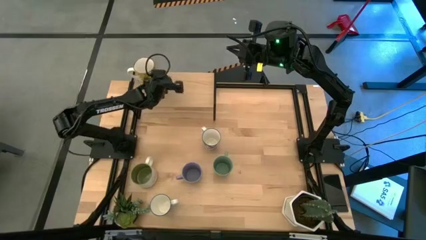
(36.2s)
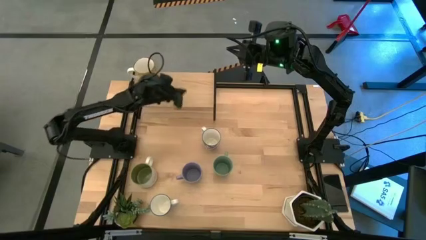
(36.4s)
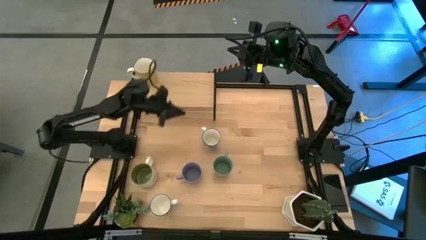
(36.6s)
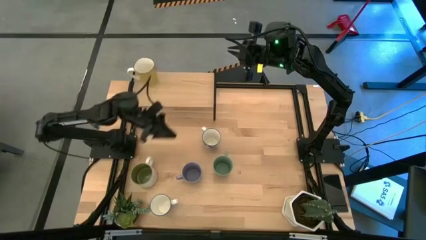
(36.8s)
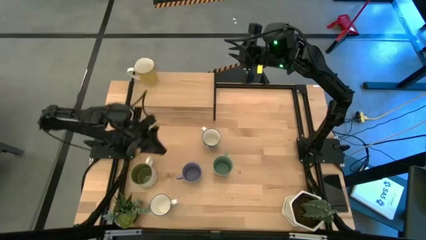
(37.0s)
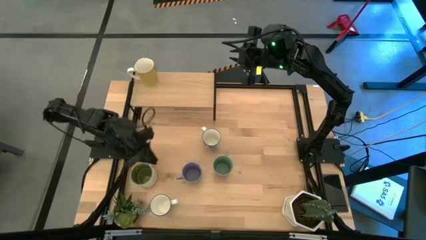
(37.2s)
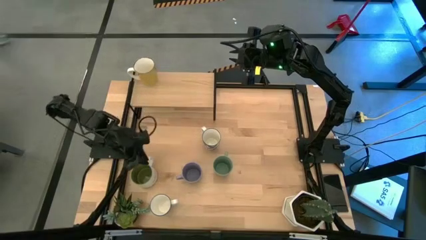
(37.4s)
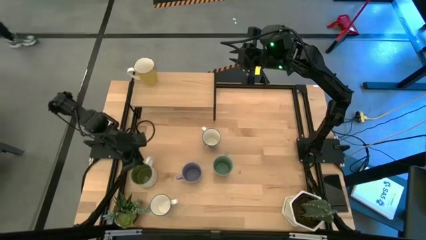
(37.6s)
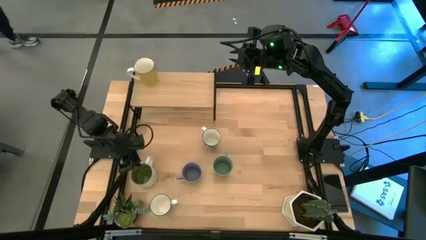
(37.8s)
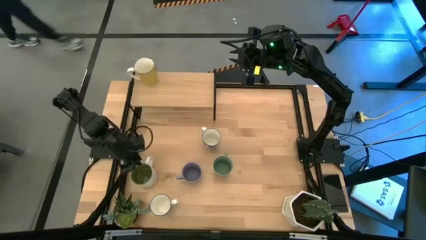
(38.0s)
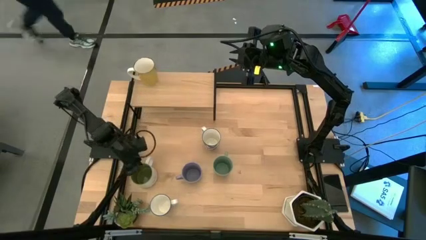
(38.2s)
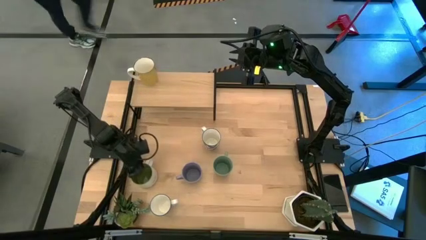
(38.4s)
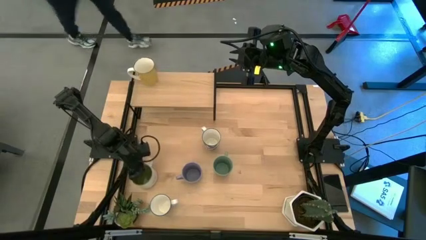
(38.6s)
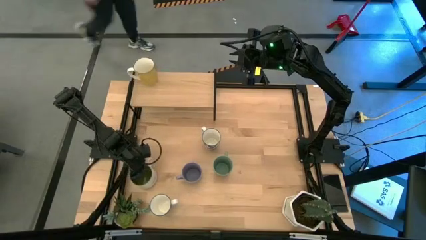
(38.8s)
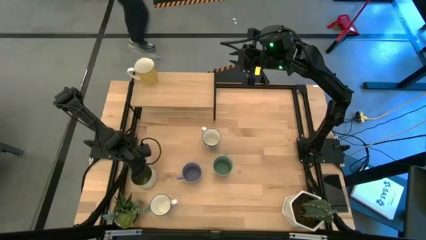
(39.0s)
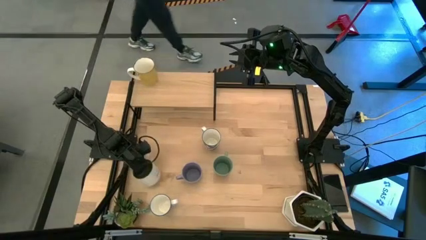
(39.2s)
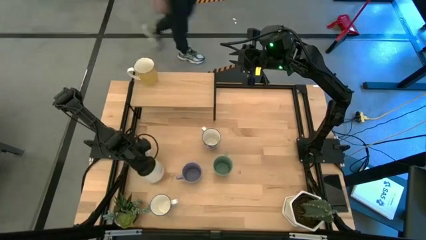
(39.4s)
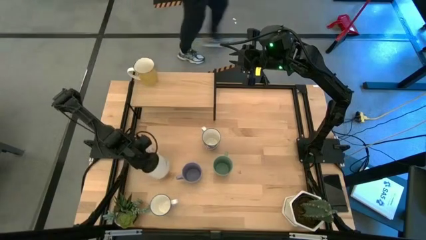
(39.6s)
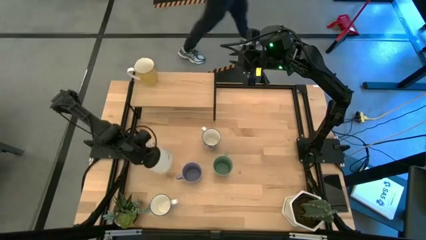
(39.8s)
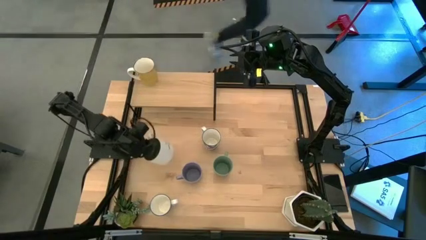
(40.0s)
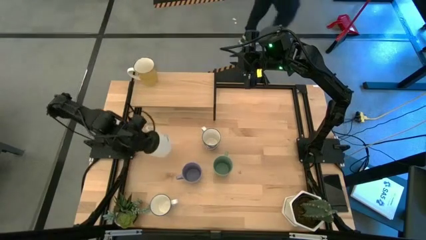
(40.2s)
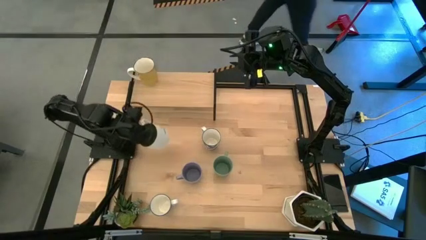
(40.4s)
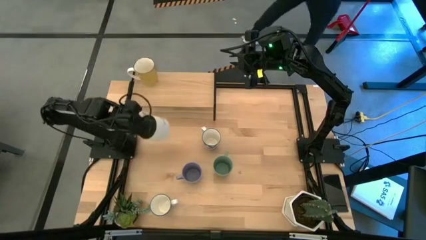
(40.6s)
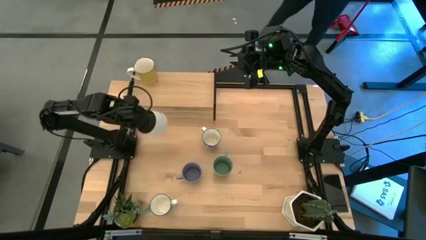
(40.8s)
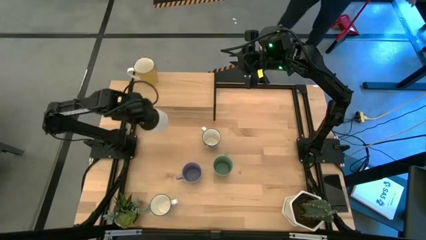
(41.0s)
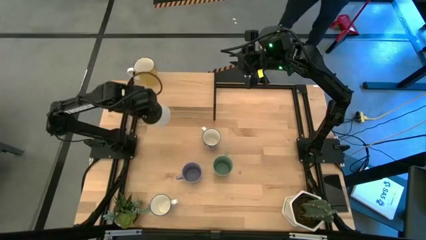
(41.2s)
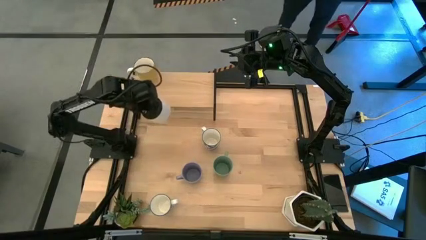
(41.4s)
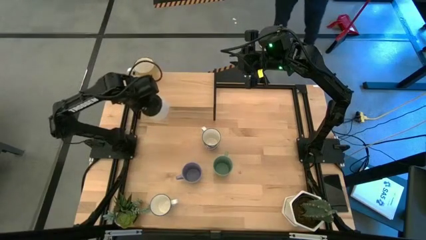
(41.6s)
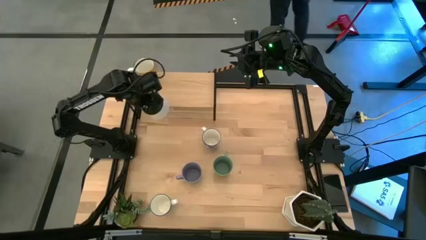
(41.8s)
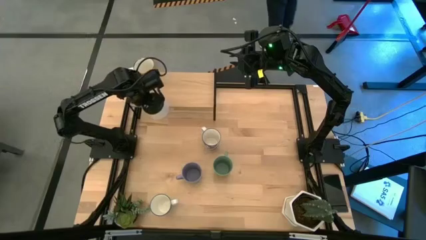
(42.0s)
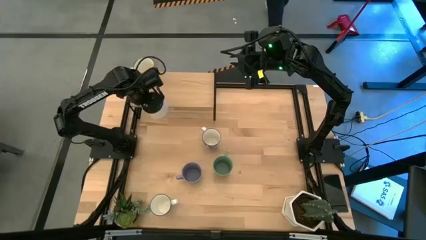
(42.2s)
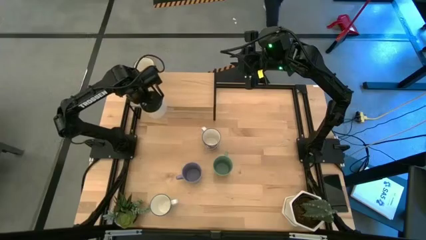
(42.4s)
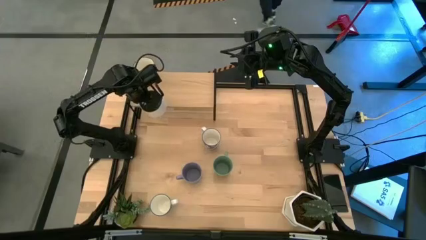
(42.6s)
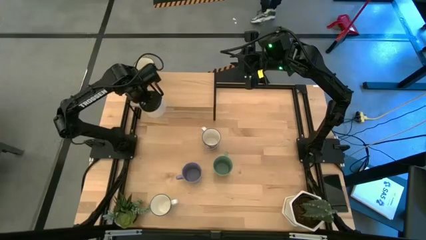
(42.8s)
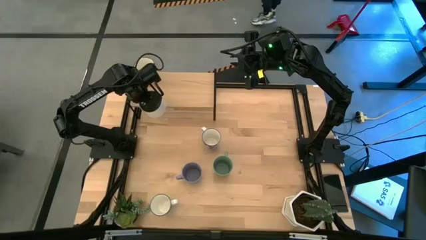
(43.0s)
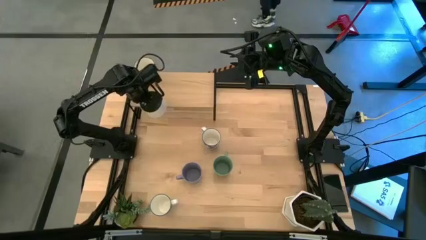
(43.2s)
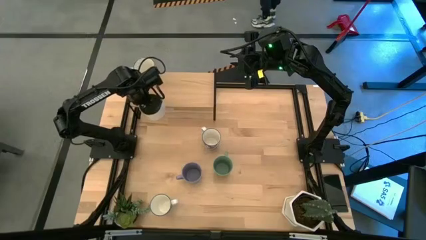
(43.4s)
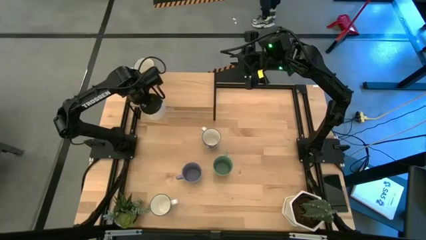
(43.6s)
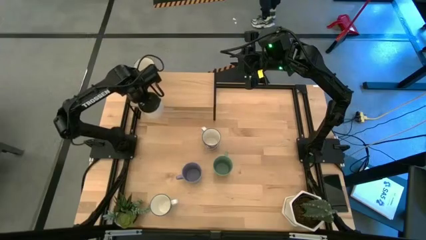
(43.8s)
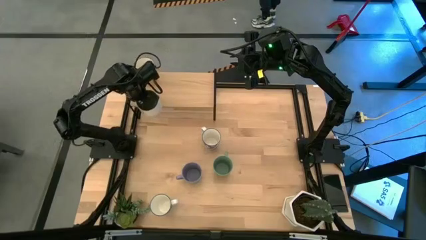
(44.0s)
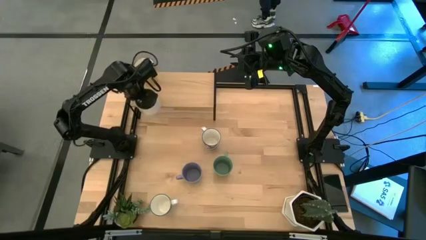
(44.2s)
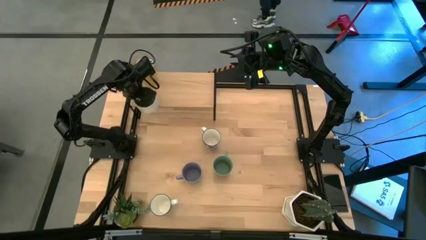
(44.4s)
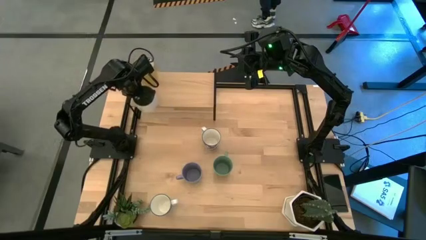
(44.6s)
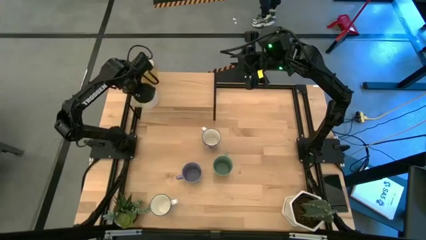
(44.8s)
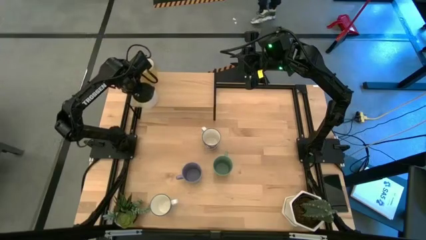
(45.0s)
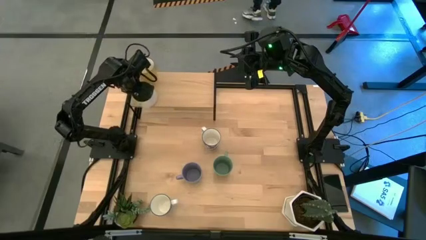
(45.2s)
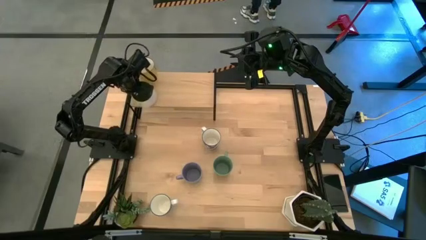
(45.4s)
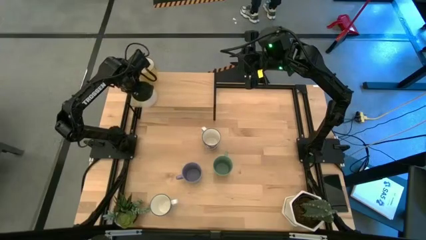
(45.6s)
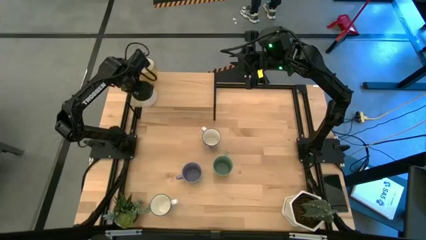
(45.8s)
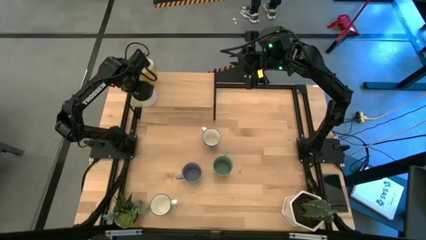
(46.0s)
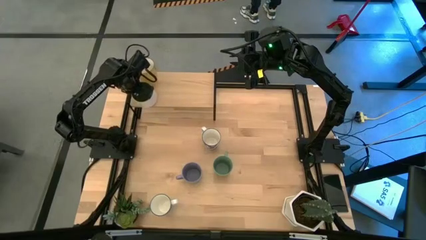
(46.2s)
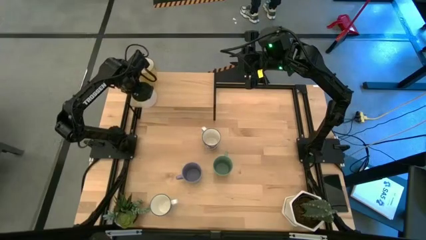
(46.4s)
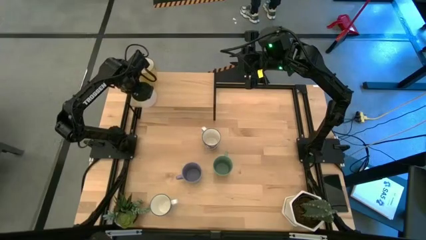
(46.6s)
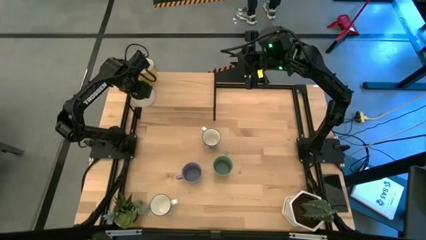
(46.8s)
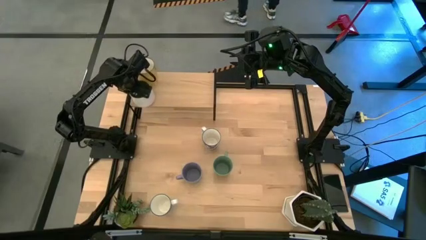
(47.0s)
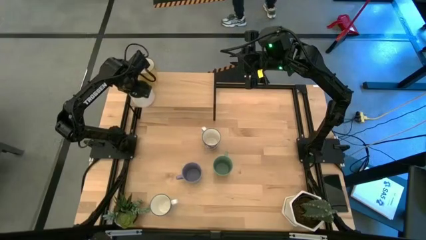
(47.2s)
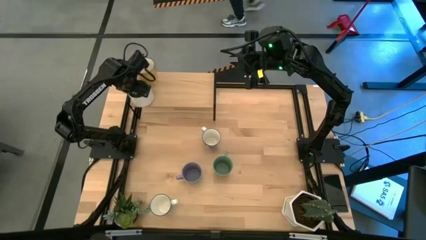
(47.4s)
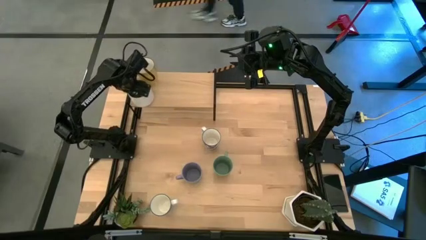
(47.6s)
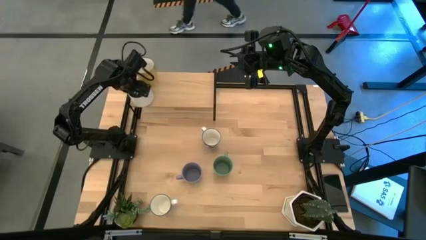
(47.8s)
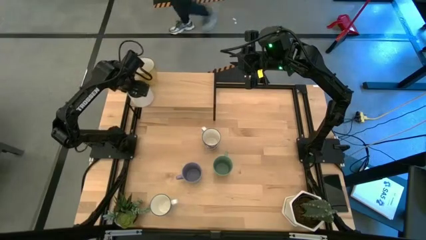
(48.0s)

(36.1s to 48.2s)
Task: Place coffee mugs
Put the white cup on the shelf aligned with the other yellow cup
